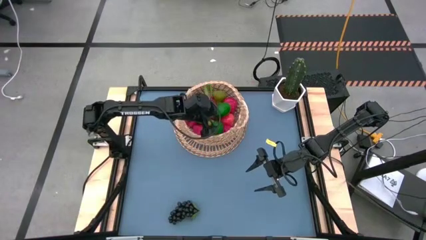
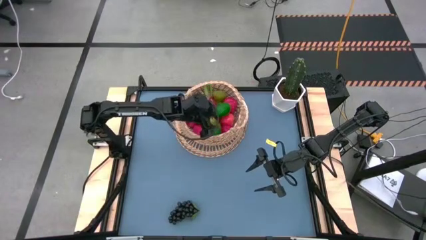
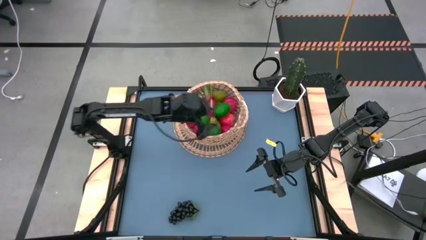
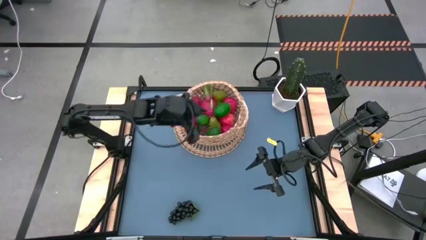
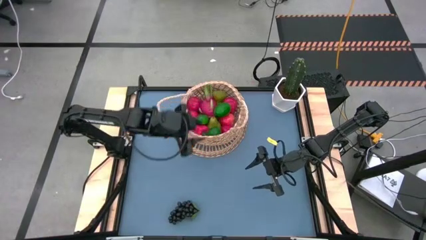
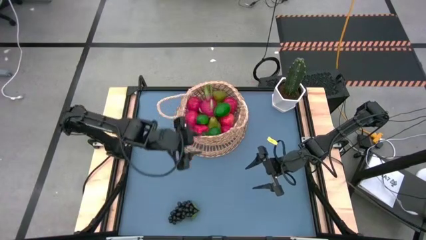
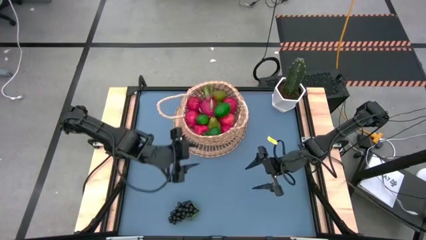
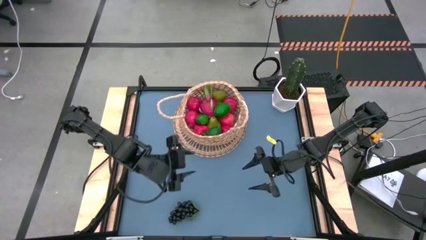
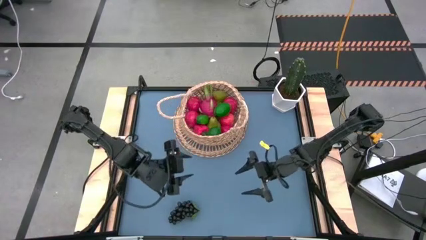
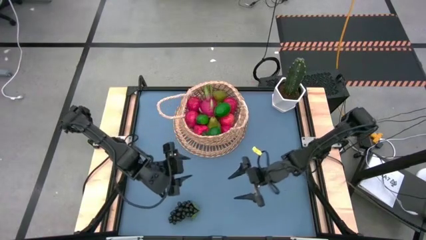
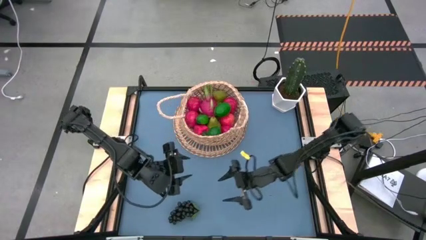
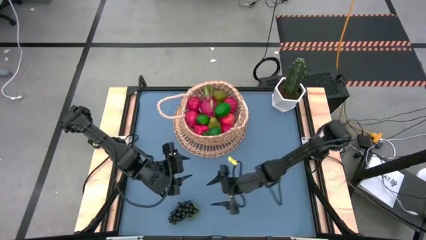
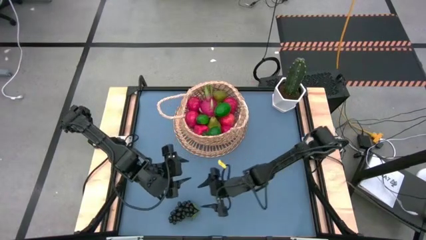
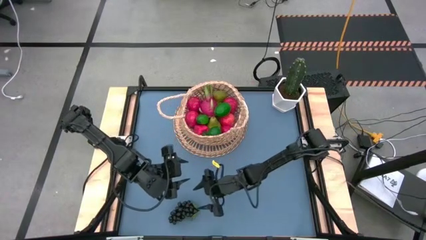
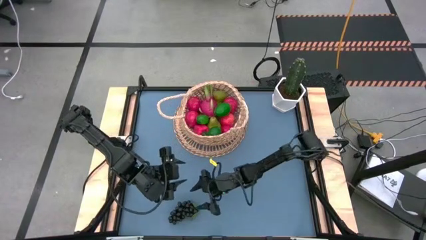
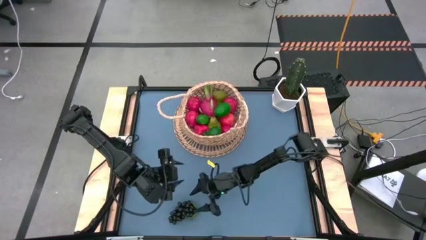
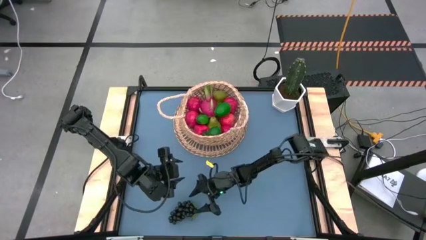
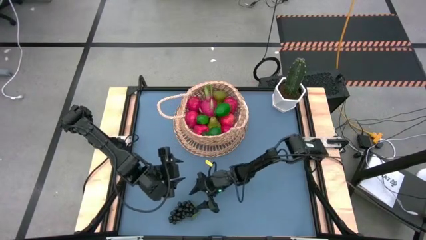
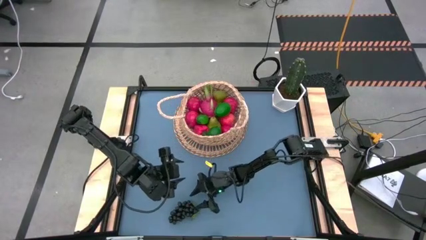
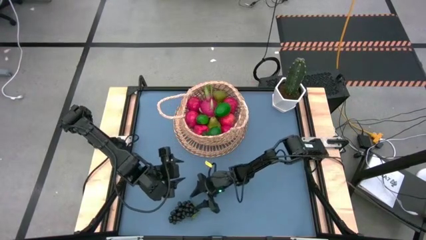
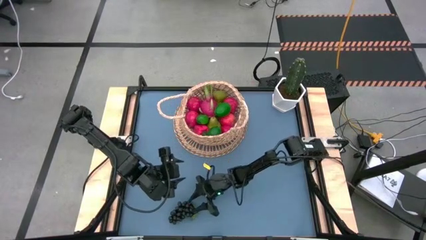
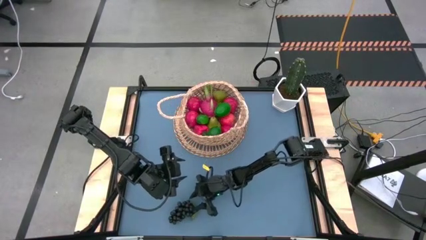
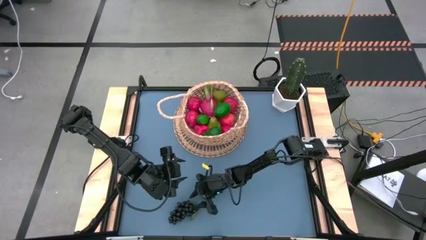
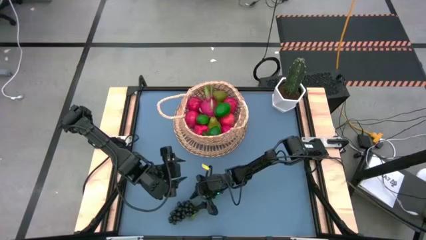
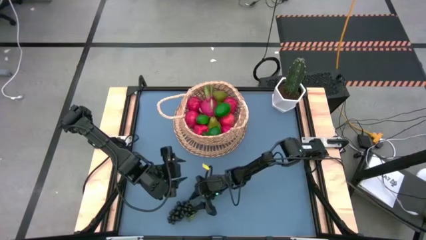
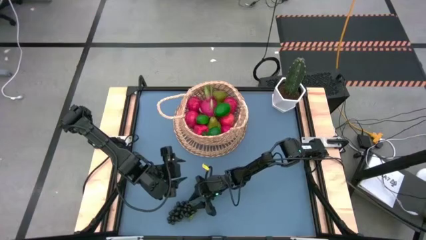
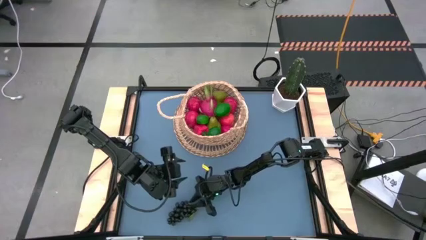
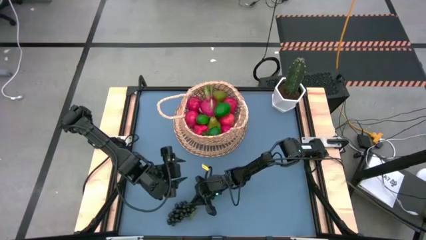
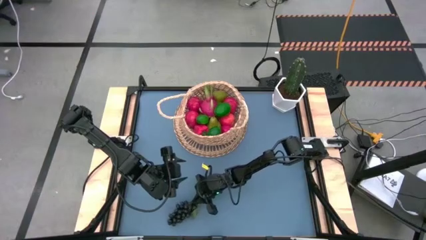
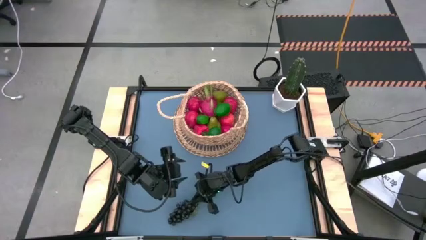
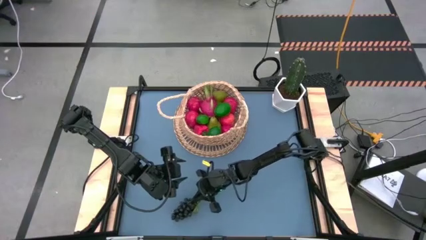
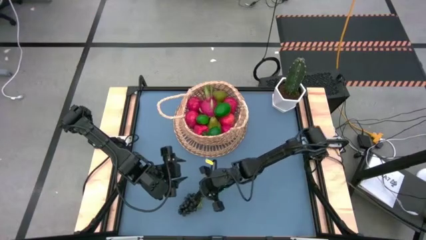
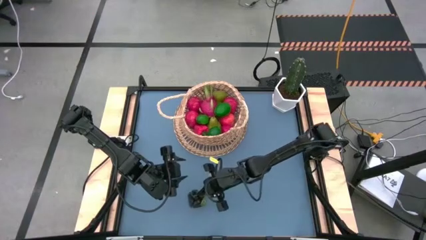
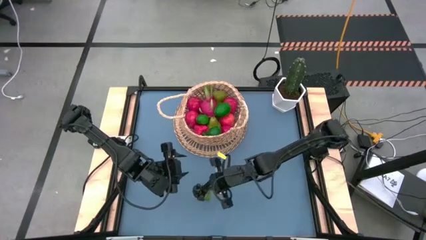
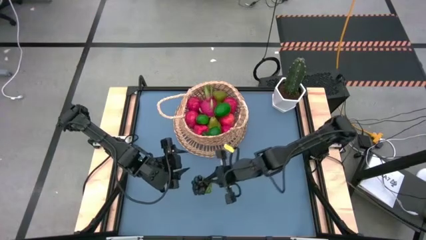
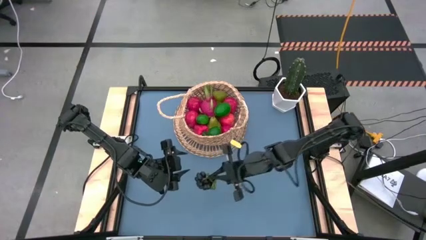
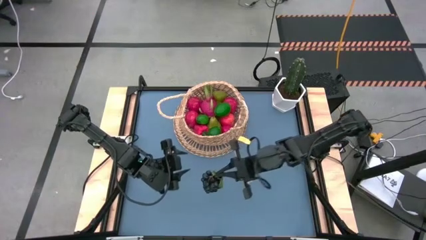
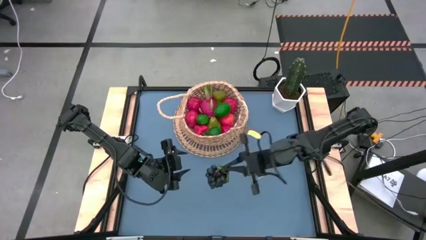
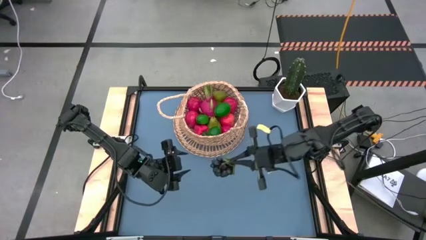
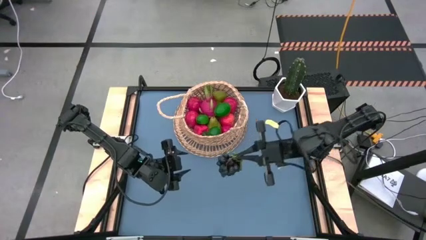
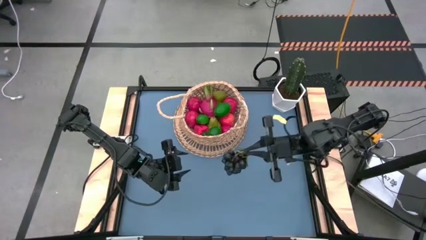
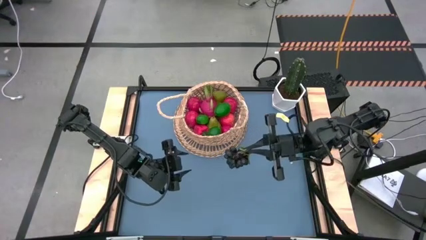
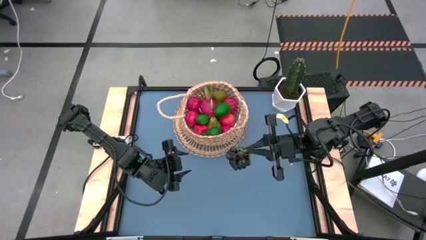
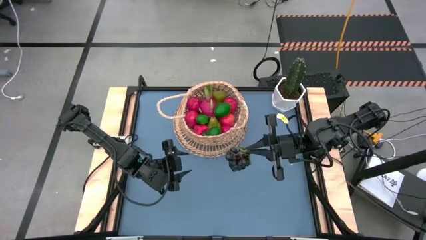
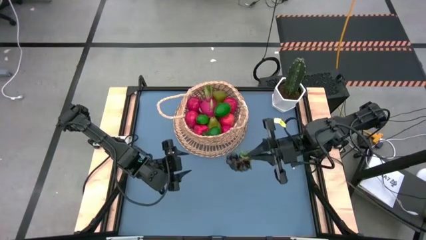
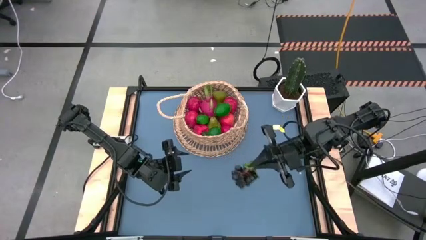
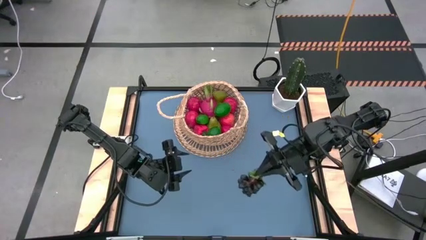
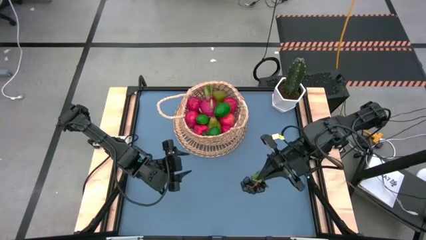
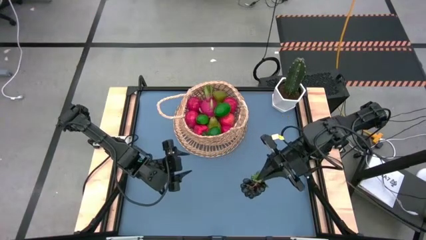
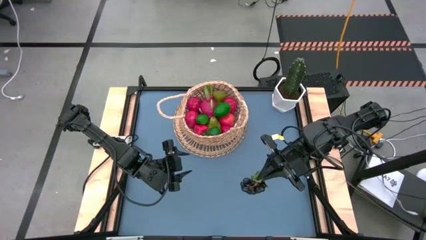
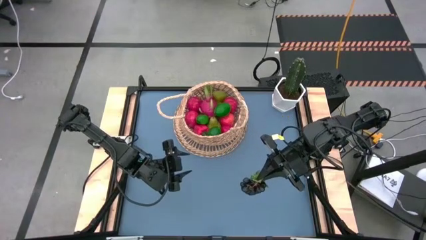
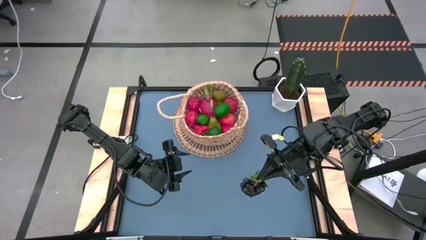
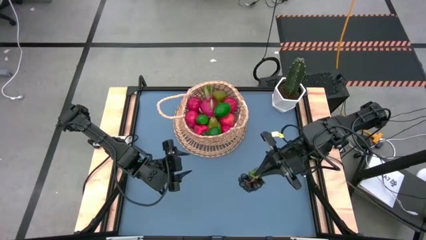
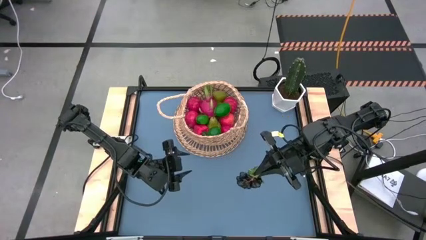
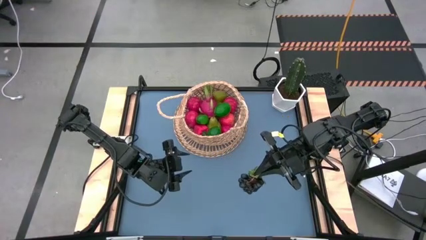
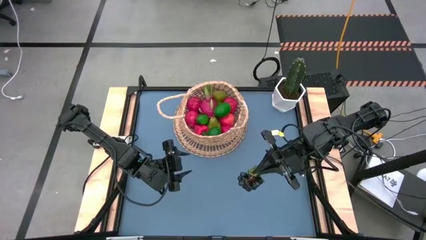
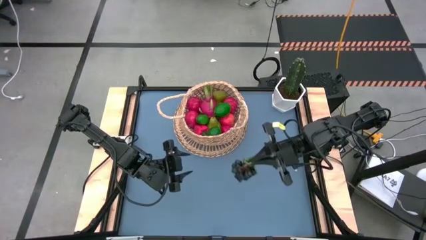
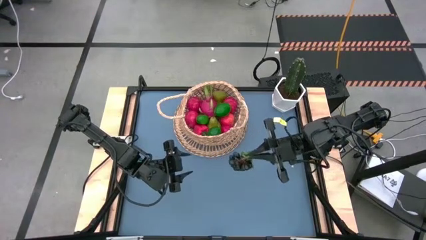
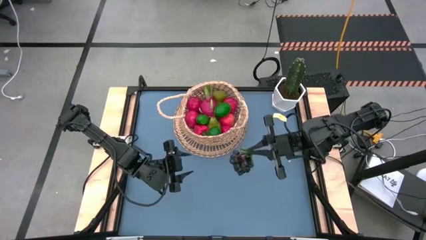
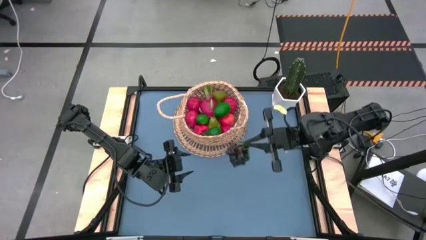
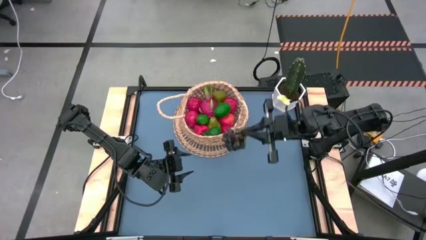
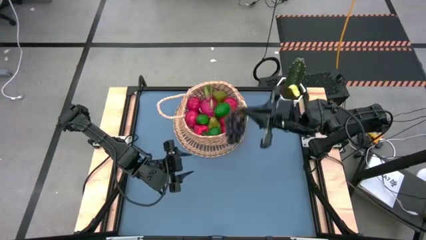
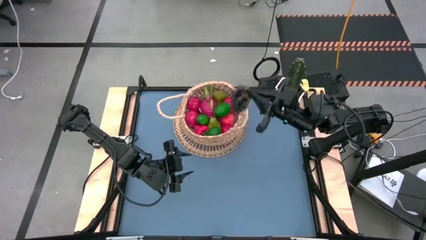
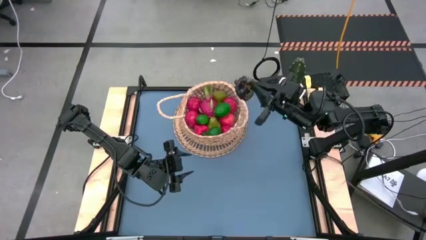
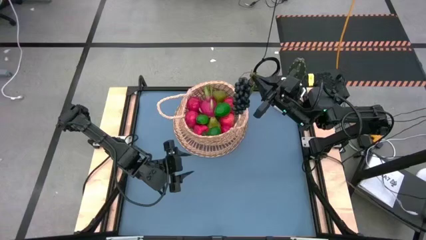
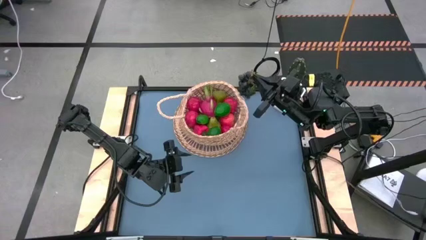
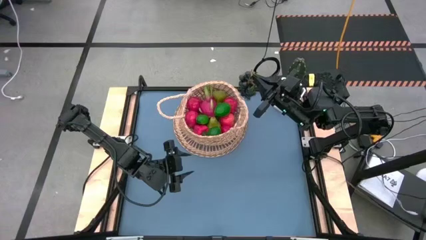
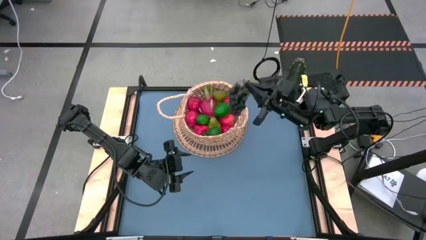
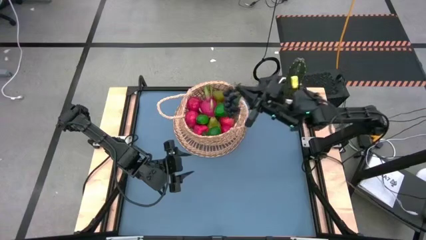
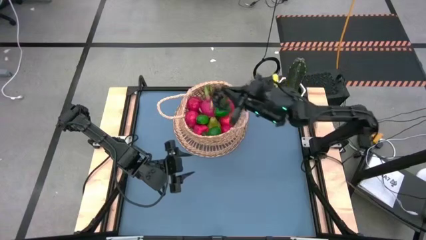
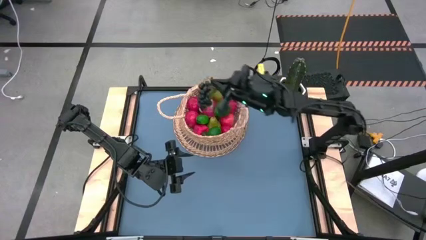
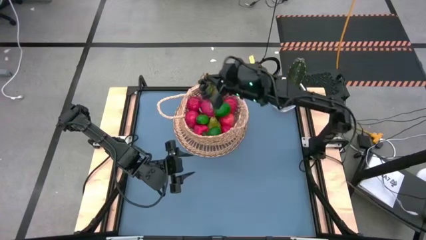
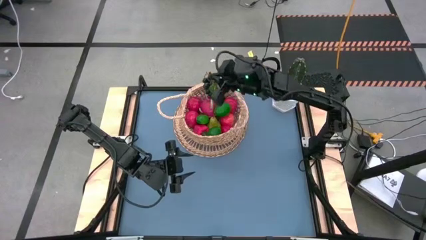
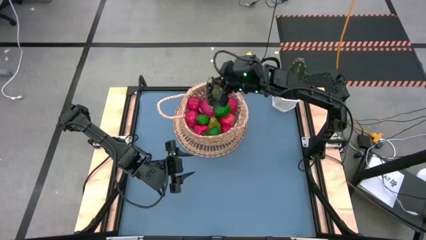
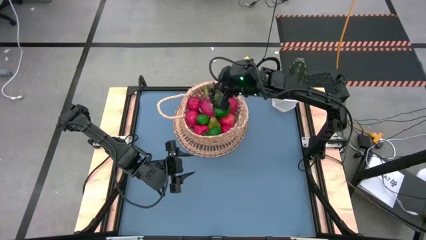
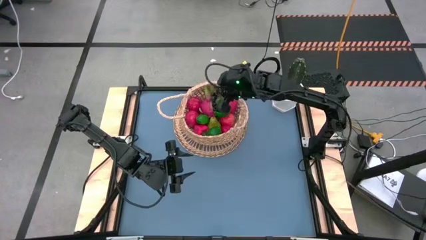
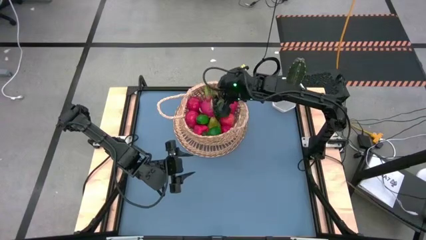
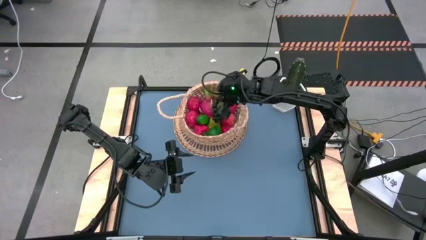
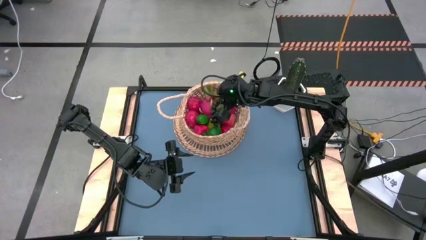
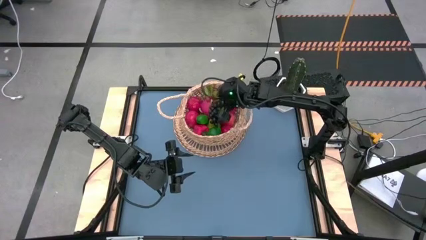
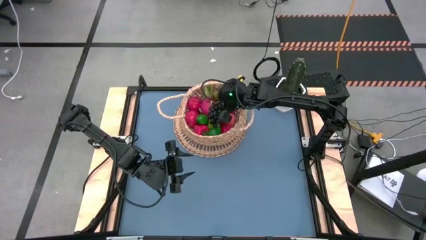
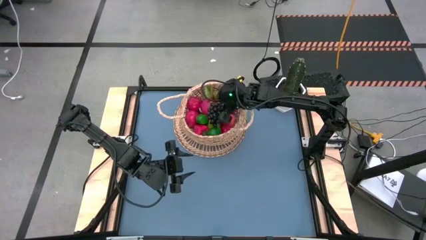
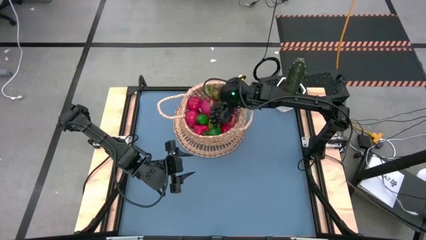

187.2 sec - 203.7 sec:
Task: Build produce basket
Put the grapes into the basket
